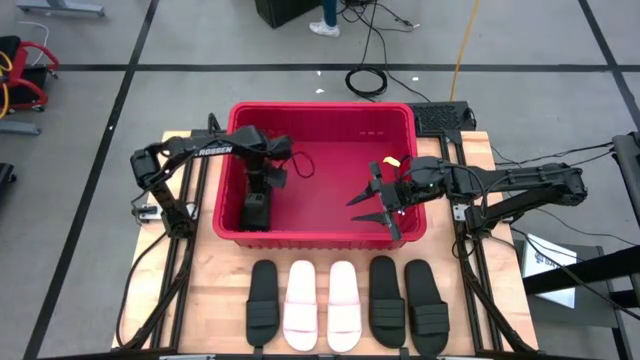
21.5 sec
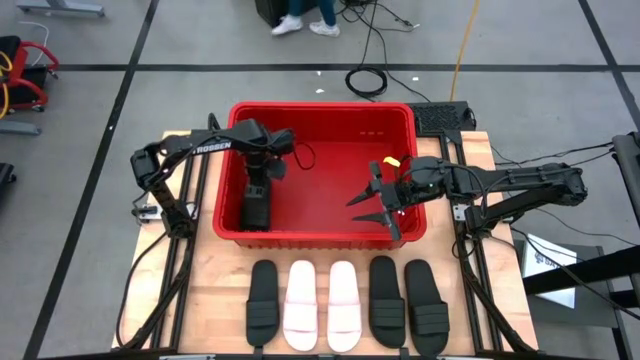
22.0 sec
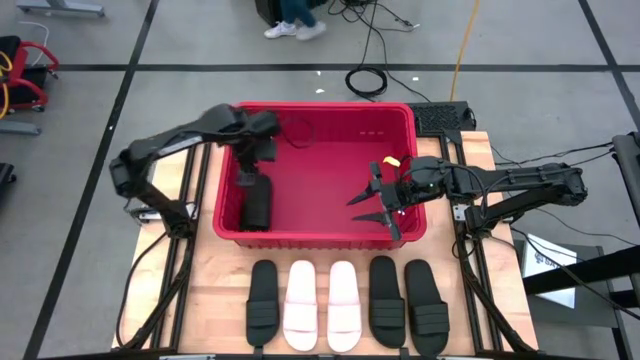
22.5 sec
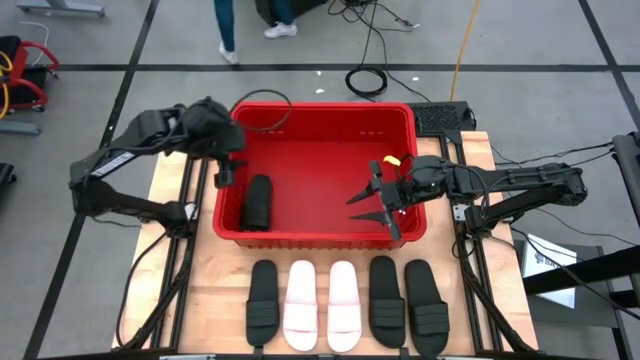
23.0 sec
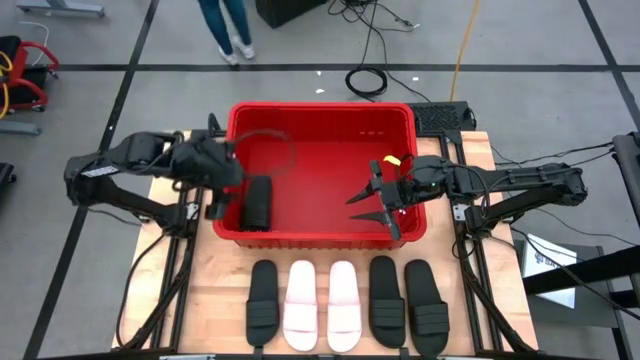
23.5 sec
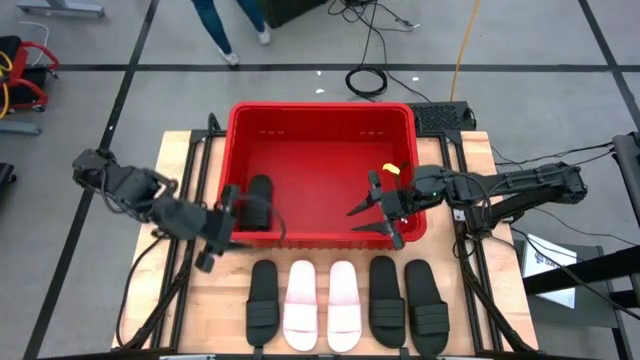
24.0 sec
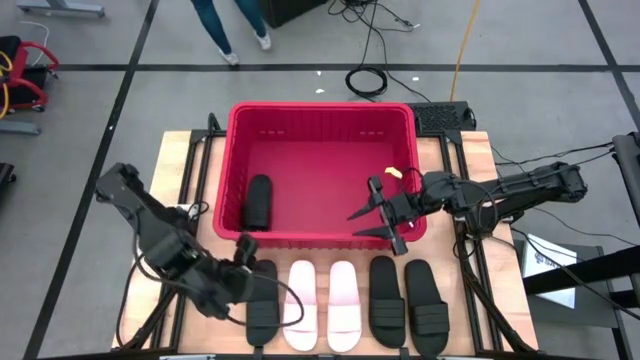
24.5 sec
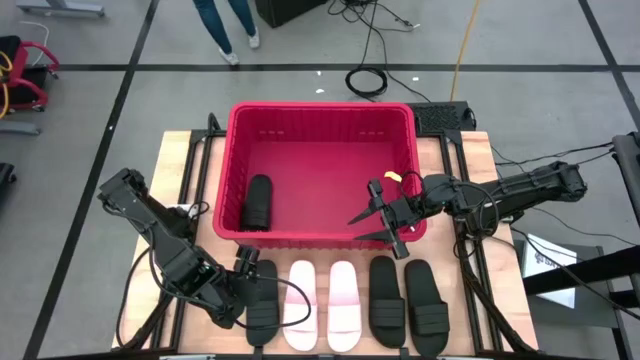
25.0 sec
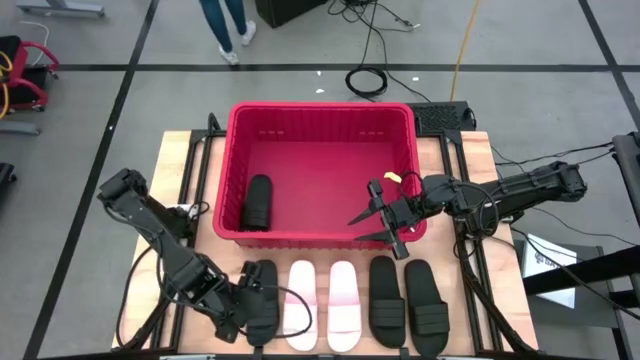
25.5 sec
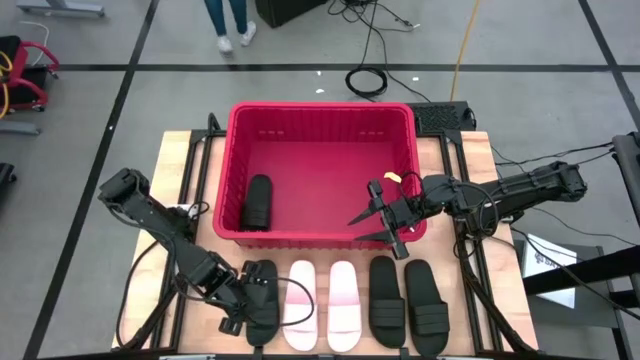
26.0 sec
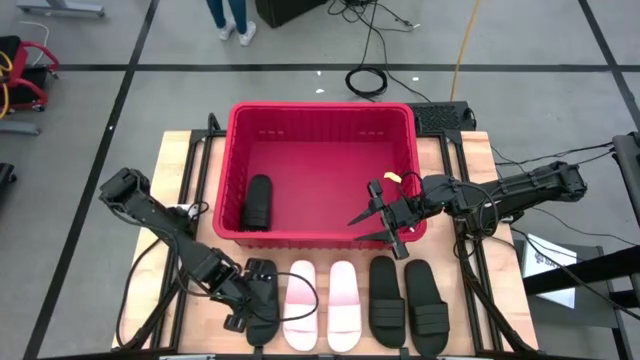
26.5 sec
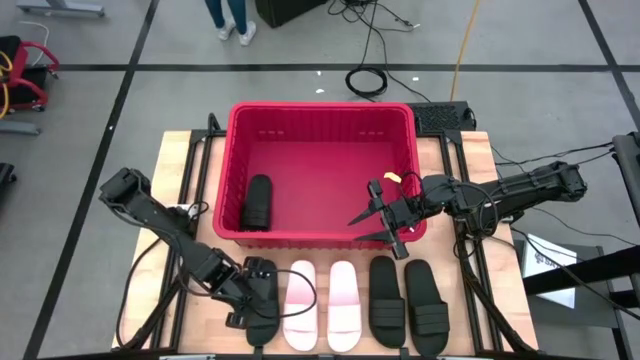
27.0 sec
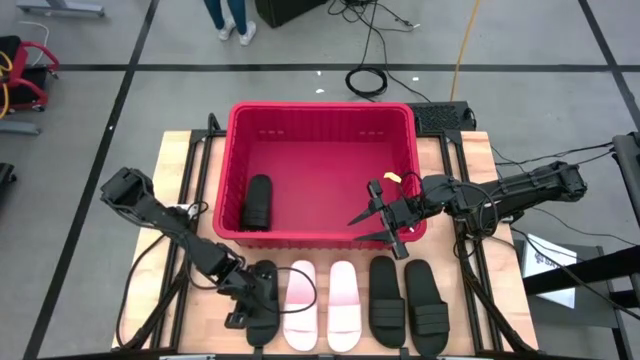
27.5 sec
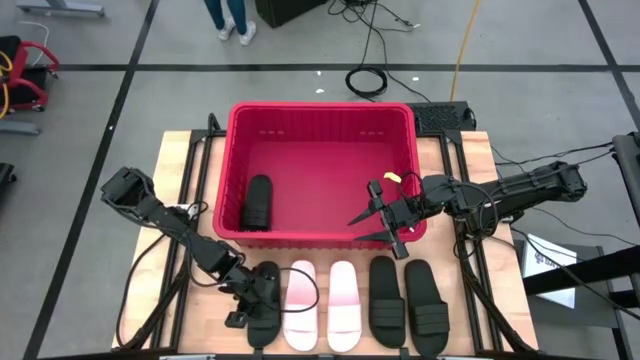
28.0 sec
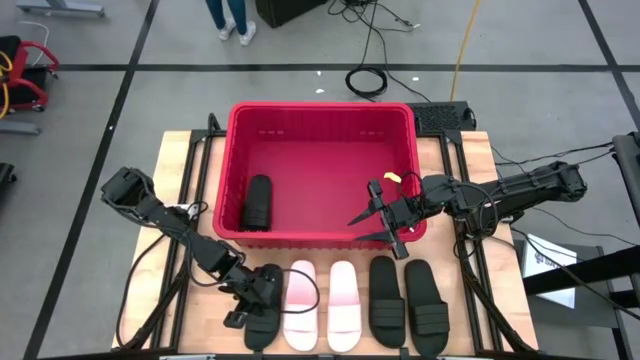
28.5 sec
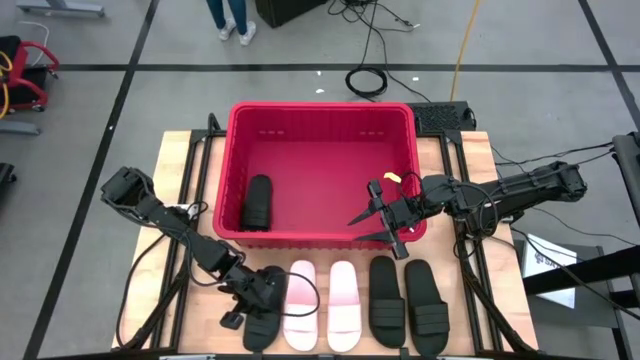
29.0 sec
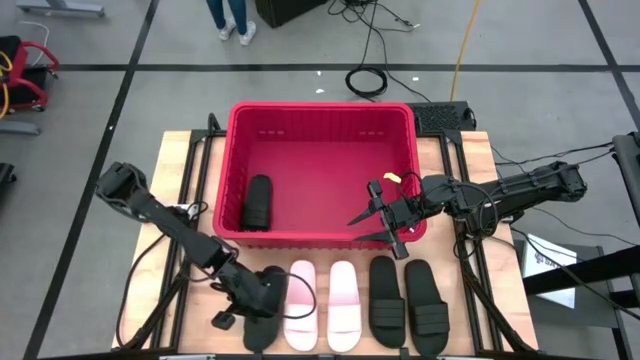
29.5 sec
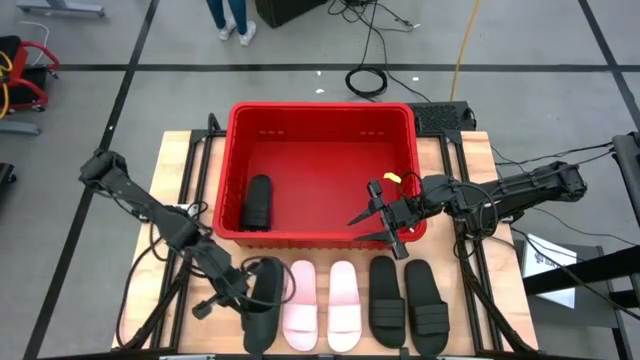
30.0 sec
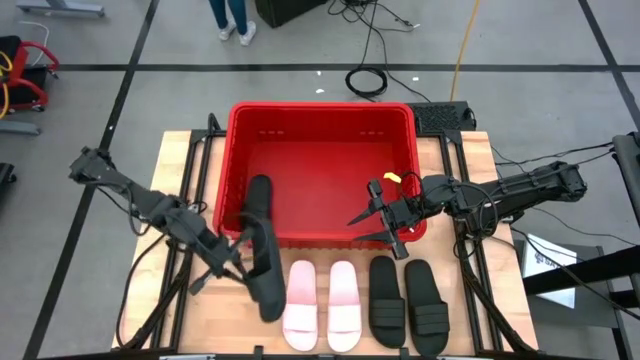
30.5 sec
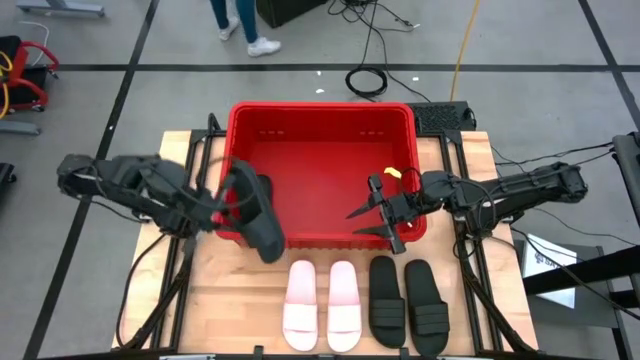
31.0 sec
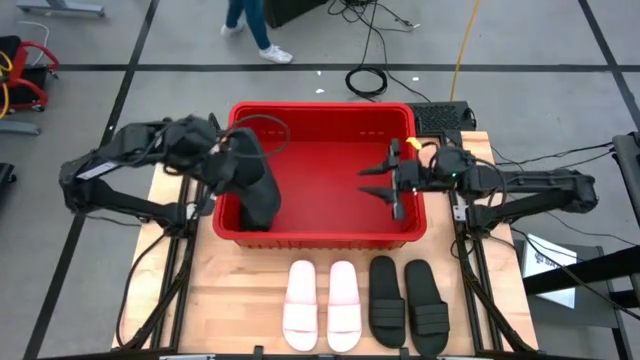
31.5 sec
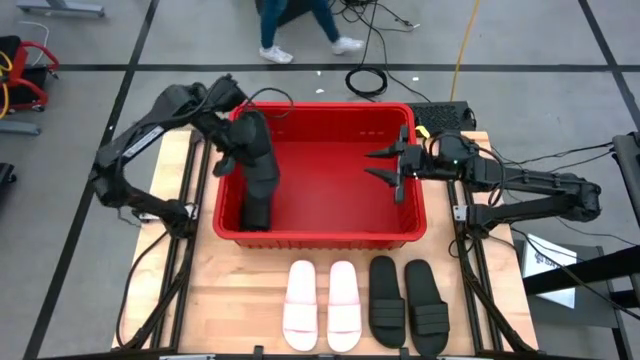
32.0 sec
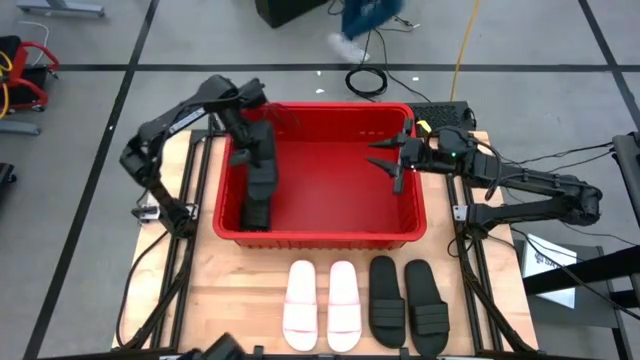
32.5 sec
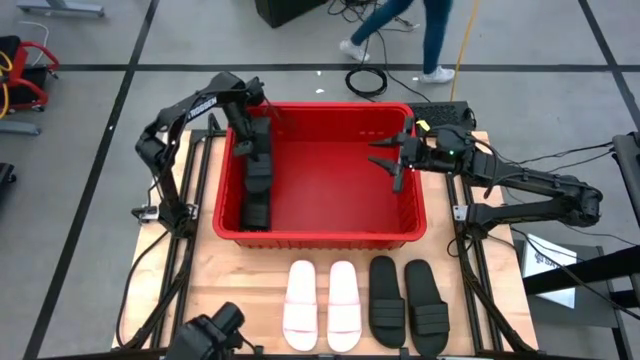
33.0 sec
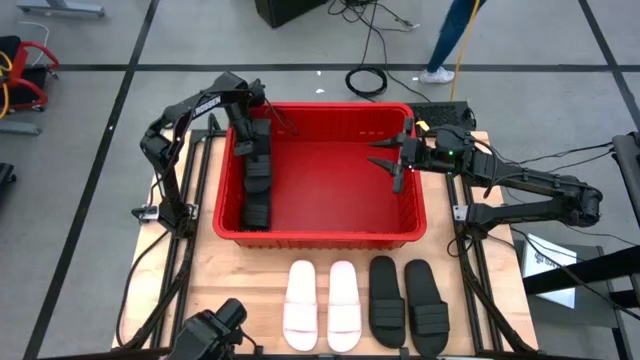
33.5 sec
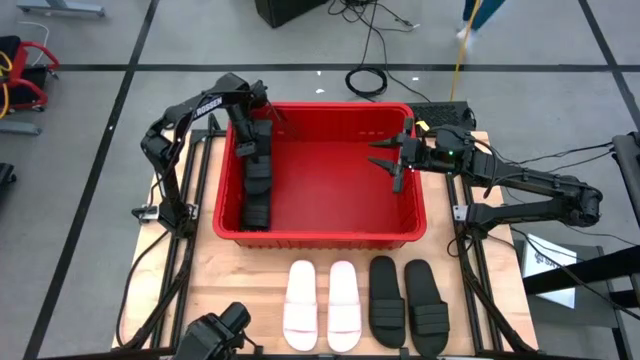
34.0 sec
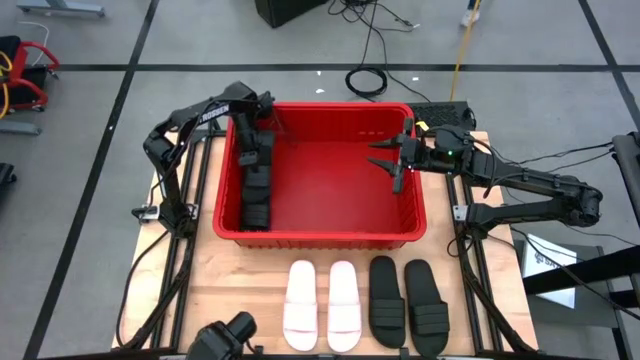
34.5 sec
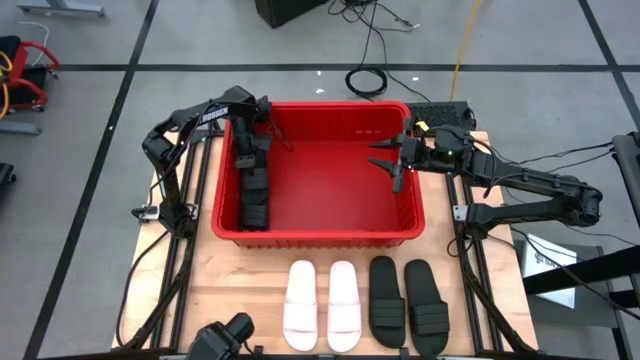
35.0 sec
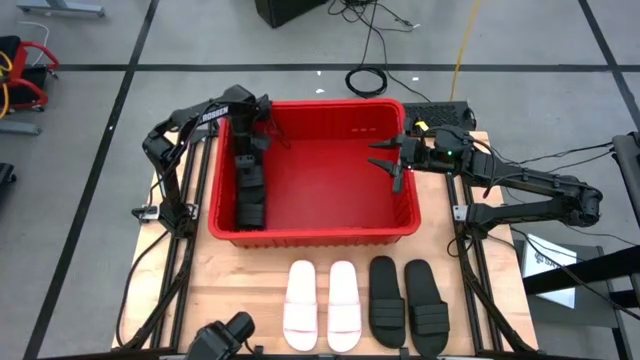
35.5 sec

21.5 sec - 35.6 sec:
Task: Pick and place slides into bin
Put the left black slipper into the red bin

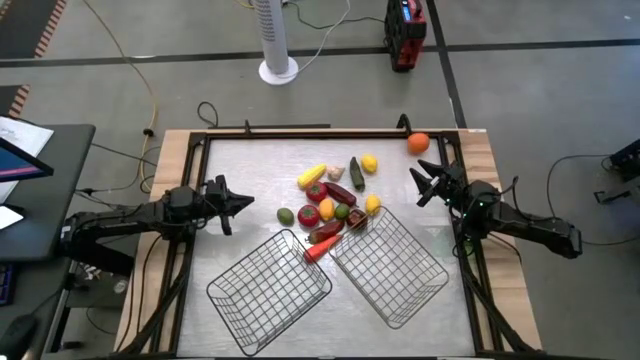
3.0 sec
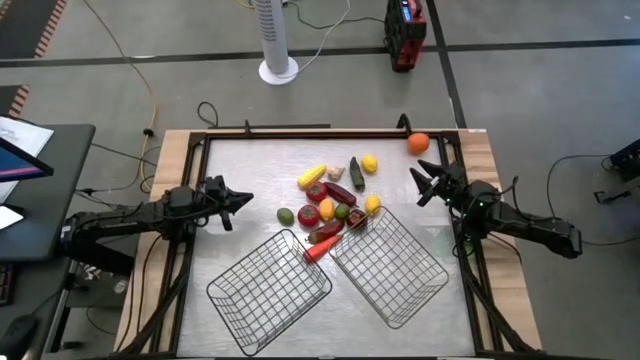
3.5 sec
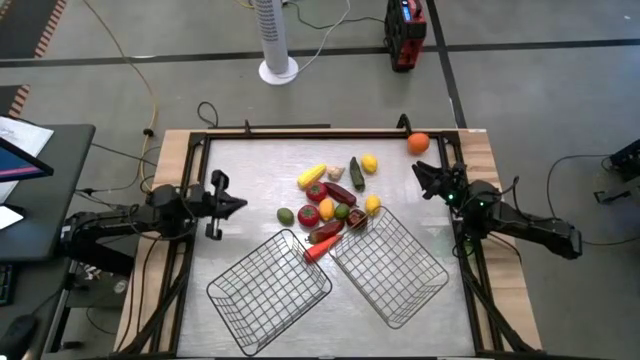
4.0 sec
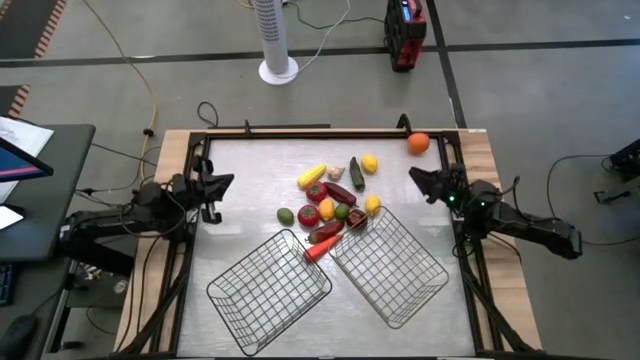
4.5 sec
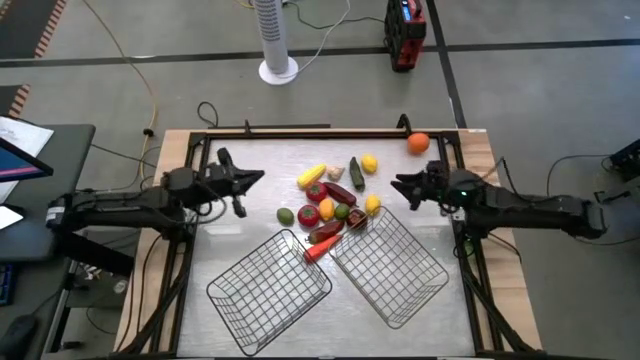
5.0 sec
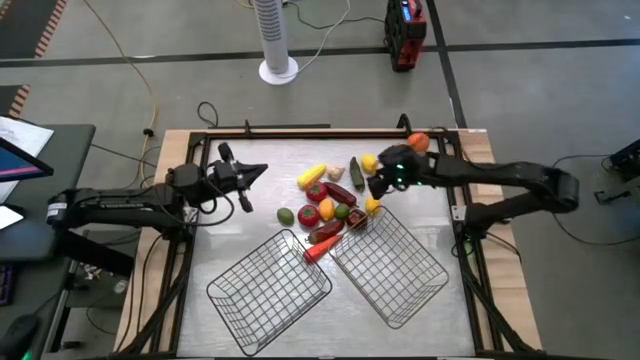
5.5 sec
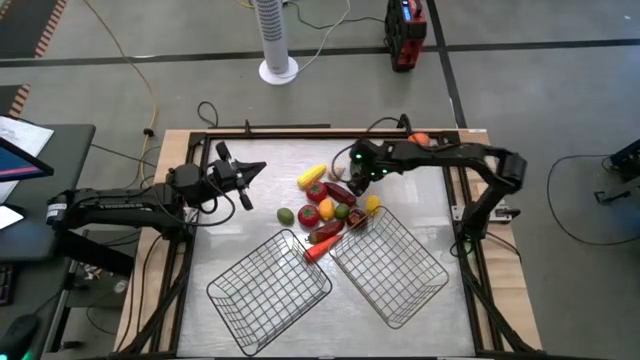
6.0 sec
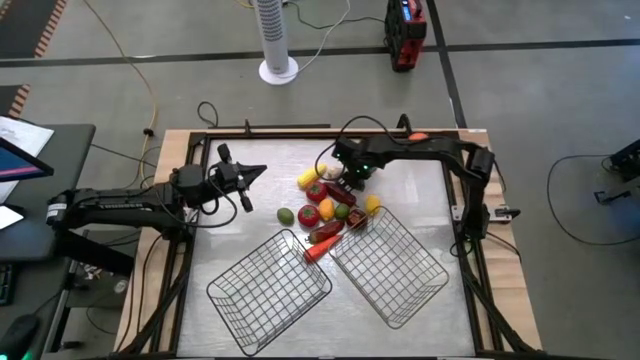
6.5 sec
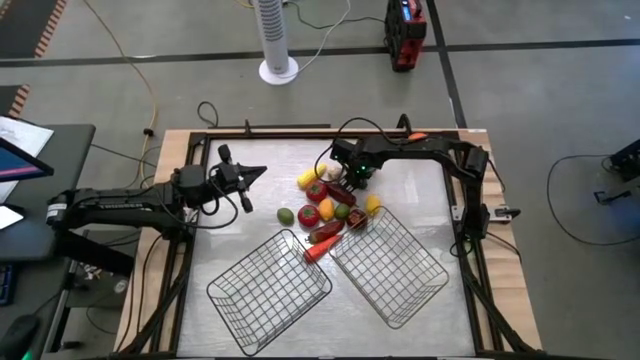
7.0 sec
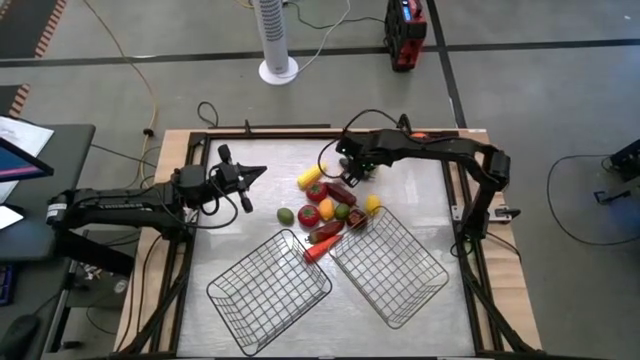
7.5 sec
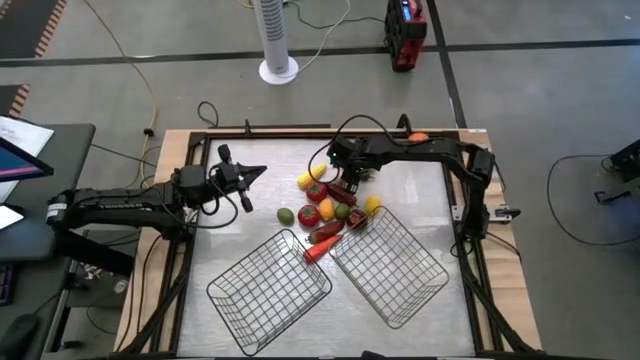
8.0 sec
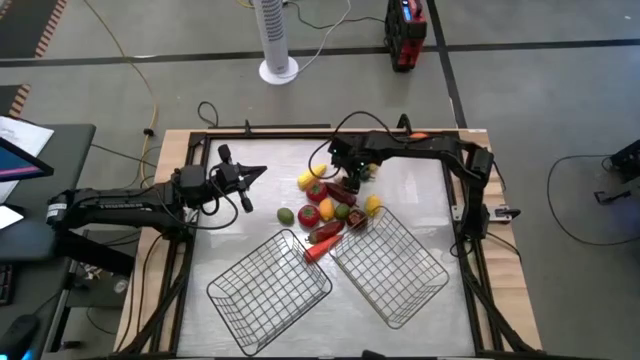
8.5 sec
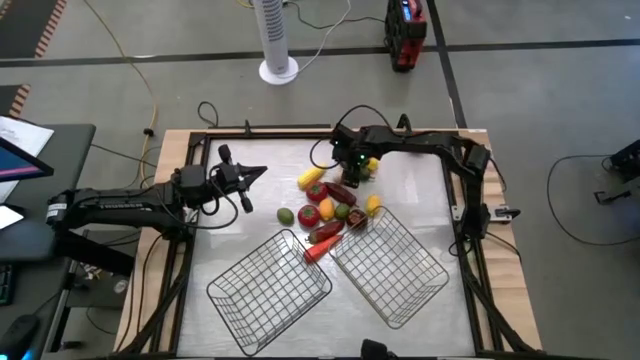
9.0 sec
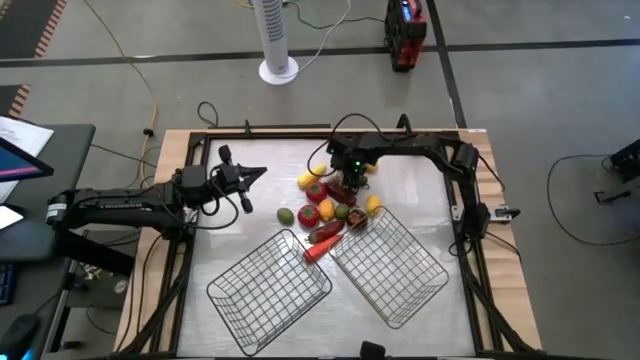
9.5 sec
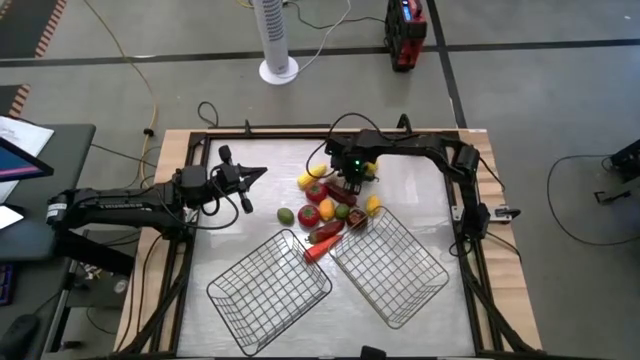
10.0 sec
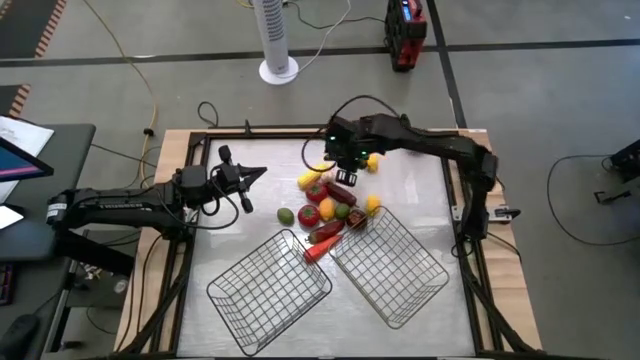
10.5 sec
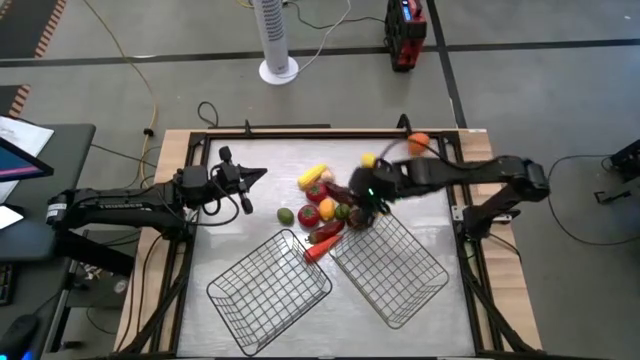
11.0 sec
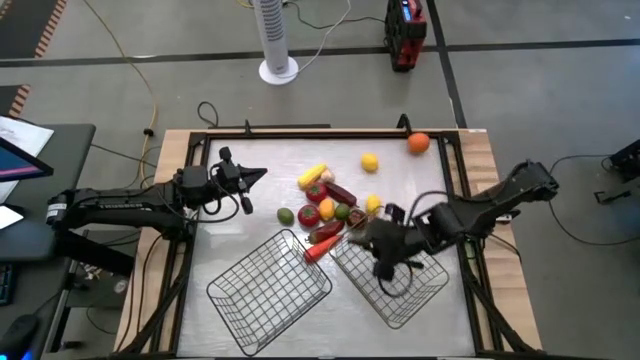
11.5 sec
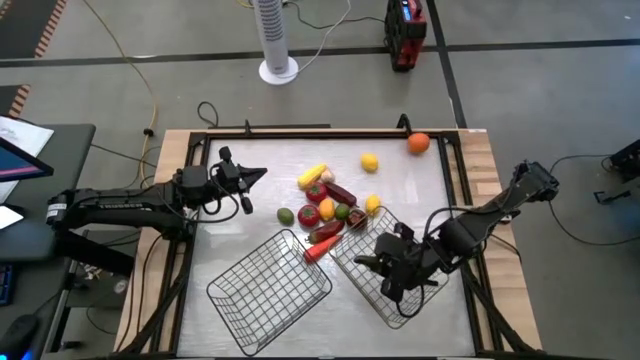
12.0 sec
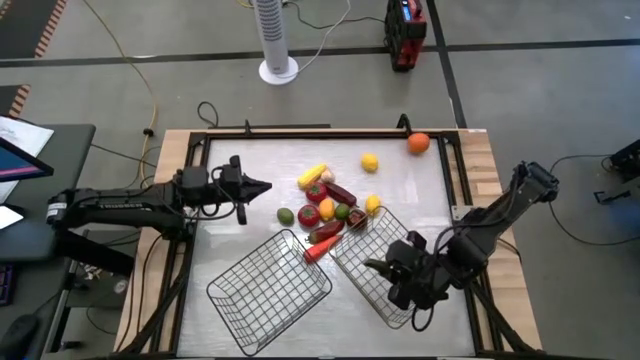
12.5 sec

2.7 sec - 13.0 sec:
Task: Sort produce into baskets
Put the green chili pepper into the gold wire basket
